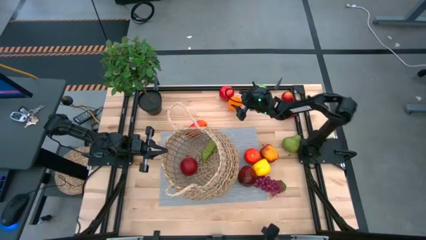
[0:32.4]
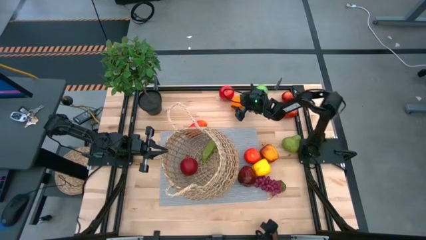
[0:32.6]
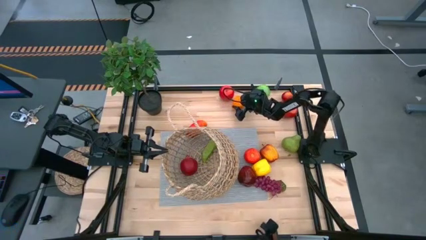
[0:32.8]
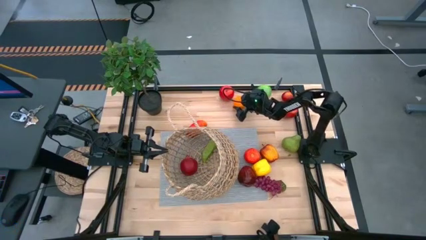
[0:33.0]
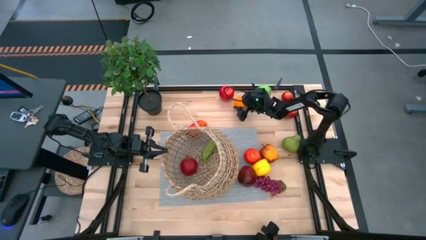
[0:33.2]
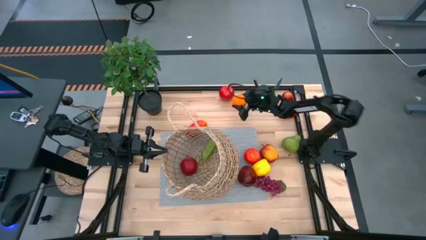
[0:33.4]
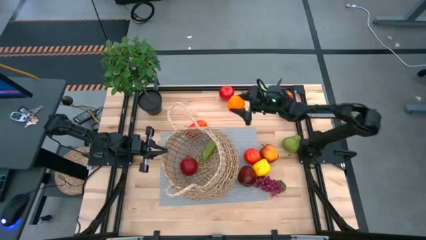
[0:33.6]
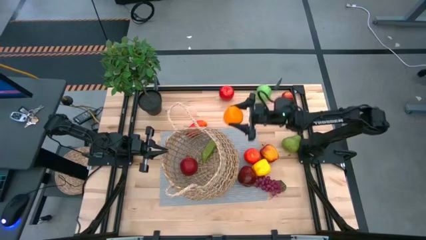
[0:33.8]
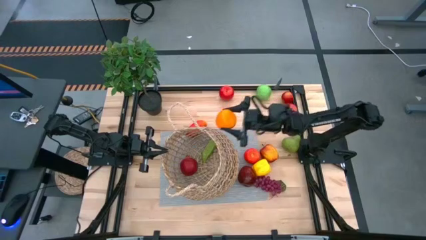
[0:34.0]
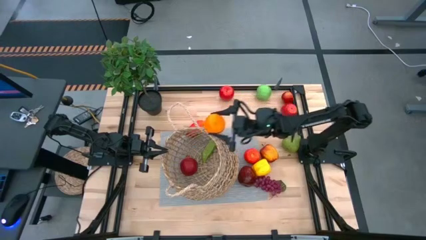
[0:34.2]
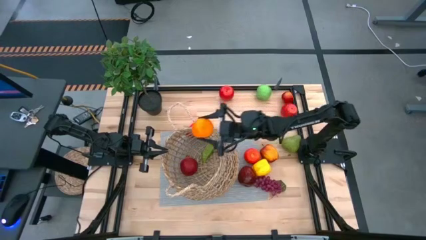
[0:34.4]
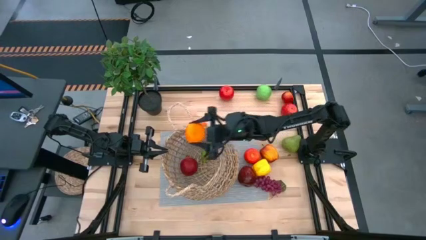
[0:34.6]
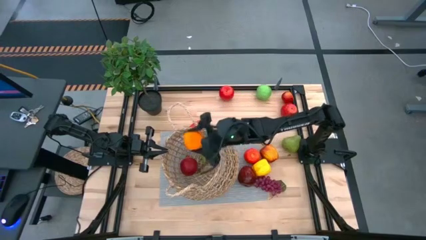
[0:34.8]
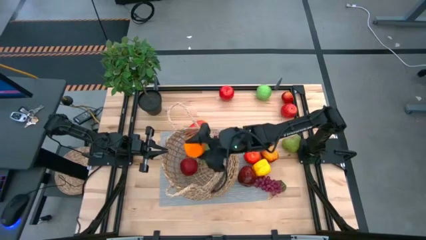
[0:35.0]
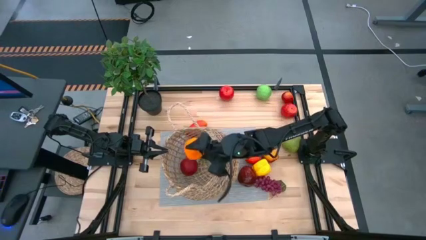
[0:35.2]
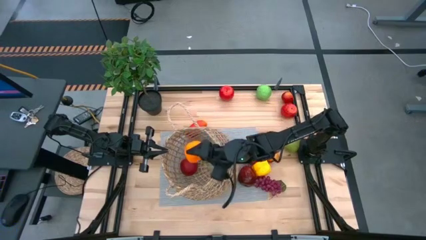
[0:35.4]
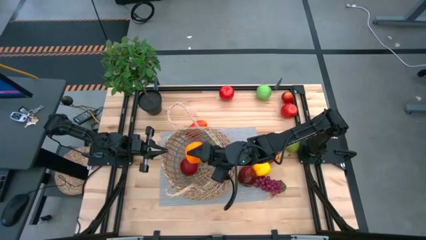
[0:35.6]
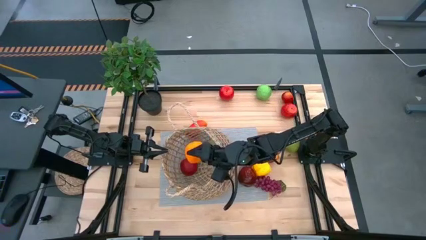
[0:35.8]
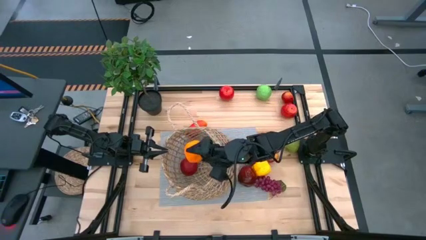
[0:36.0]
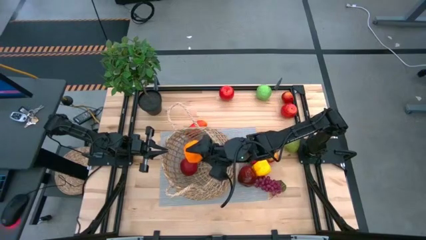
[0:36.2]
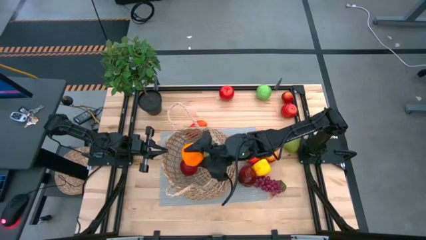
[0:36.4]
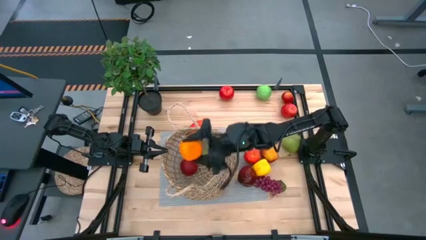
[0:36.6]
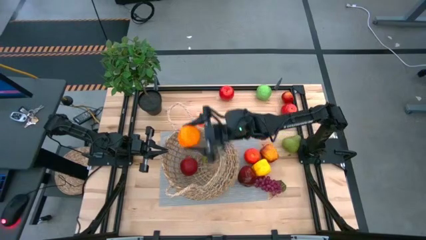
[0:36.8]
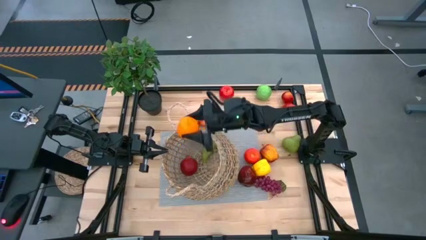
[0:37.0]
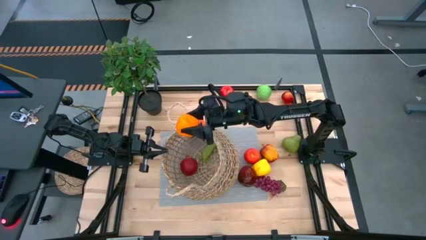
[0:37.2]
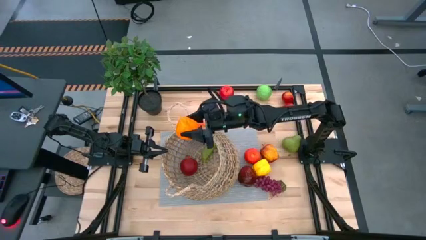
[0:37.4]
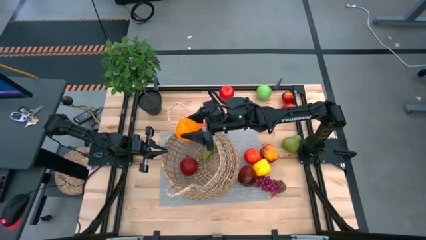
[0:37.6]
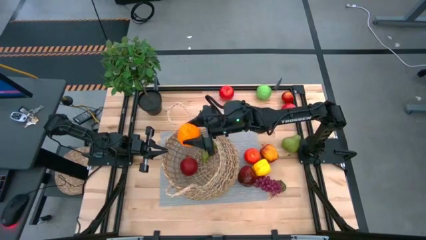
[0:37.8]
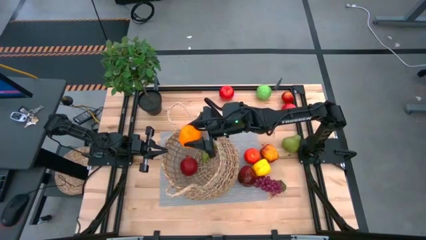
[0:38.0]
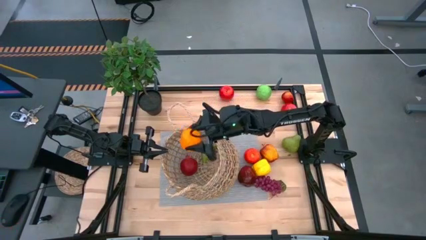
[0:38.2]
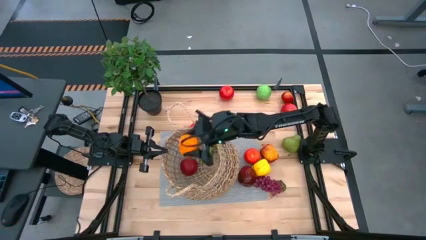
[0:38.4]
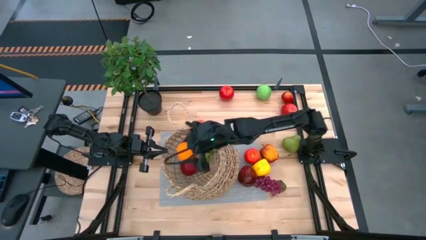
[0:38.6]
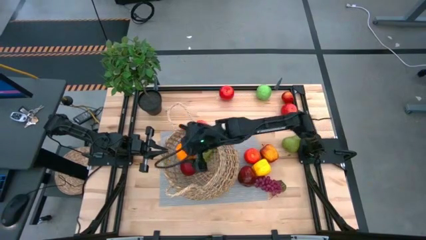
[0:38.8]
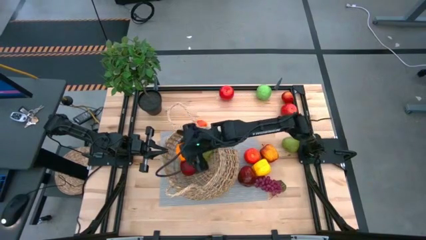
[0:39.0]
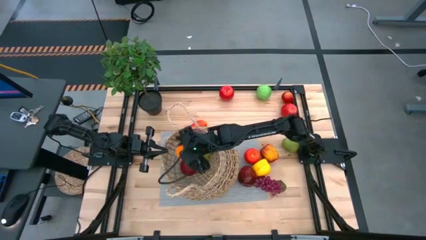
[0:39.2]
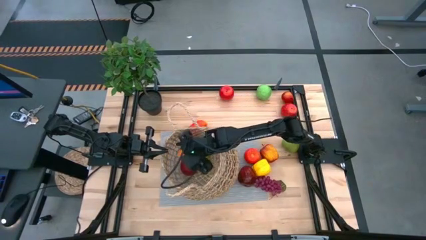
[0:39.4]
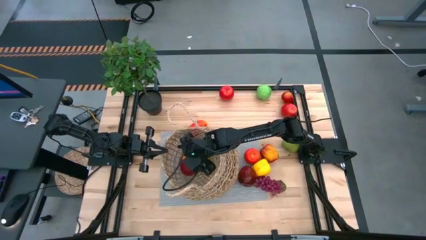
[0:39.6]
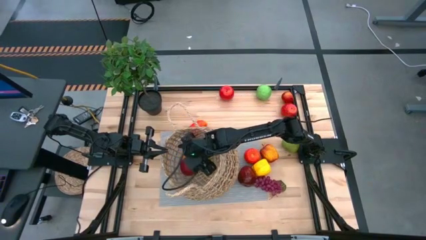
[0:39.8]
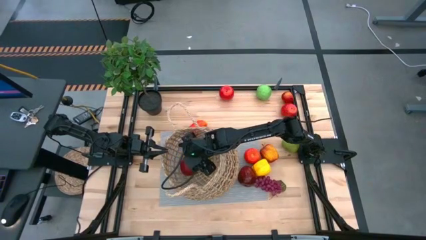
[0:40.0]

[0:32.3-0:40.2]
Task: Build produce basket
Put the orange into the brown woven basket

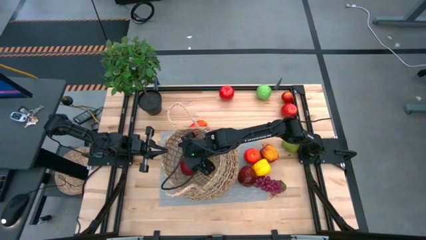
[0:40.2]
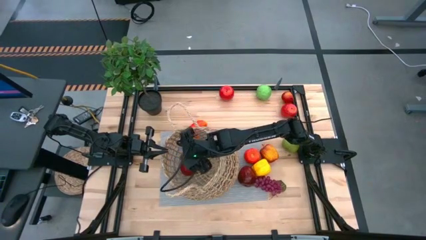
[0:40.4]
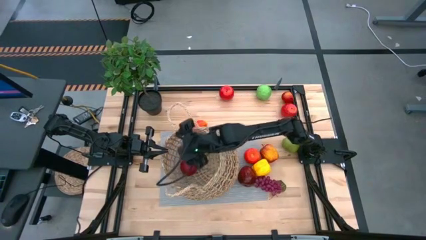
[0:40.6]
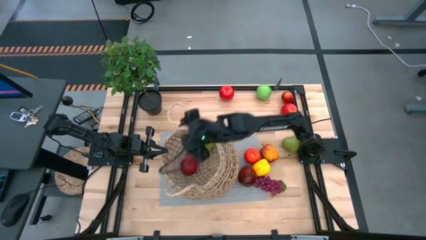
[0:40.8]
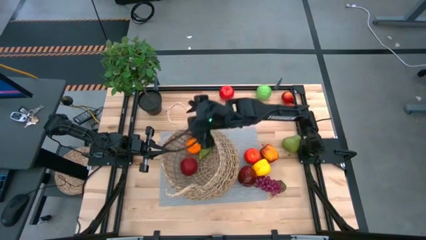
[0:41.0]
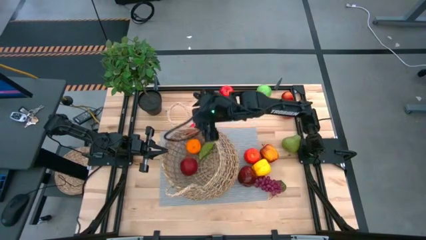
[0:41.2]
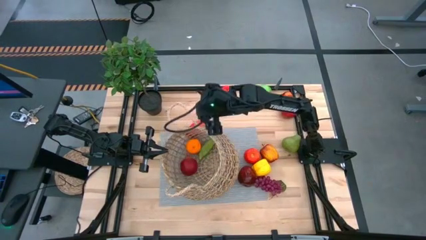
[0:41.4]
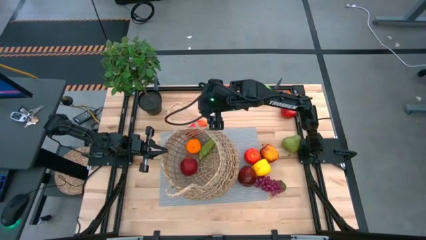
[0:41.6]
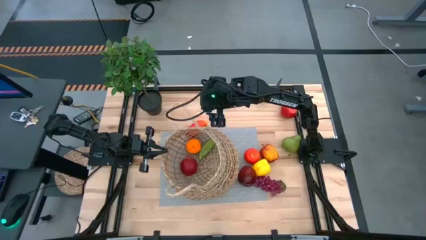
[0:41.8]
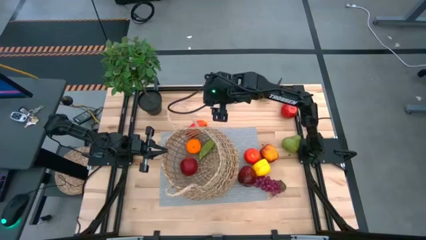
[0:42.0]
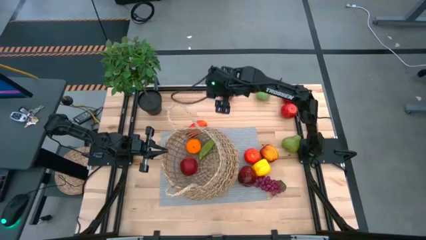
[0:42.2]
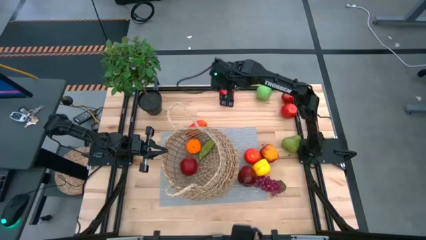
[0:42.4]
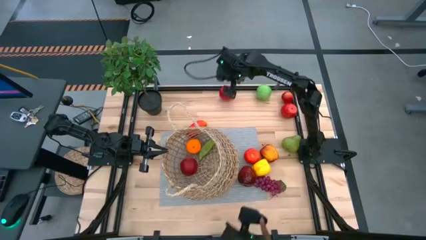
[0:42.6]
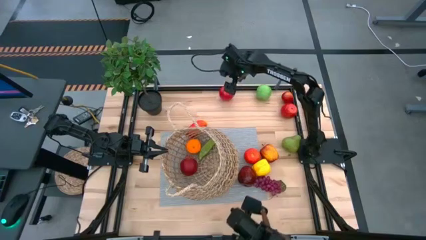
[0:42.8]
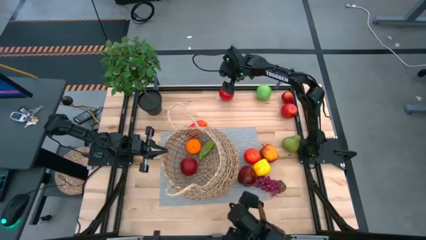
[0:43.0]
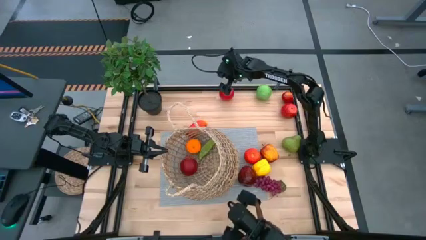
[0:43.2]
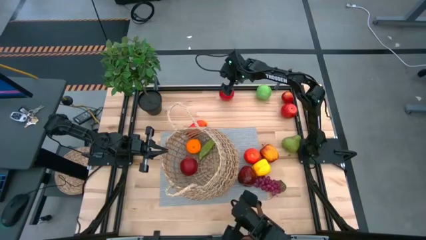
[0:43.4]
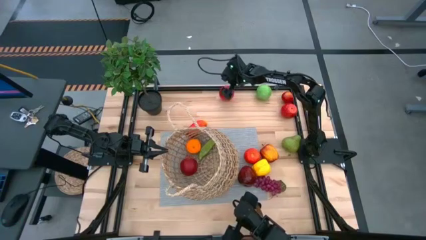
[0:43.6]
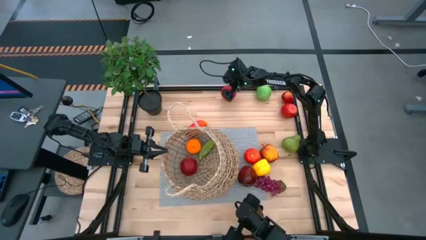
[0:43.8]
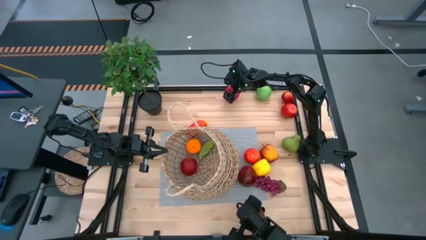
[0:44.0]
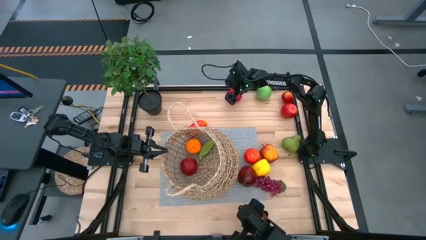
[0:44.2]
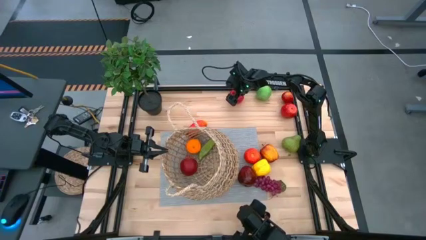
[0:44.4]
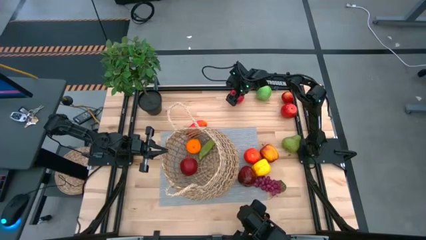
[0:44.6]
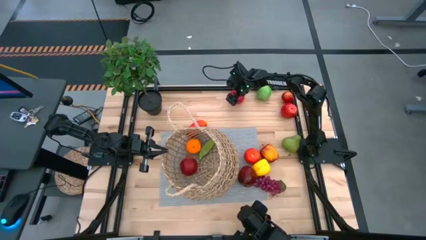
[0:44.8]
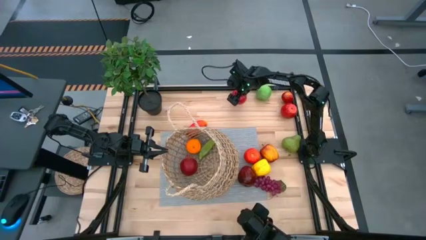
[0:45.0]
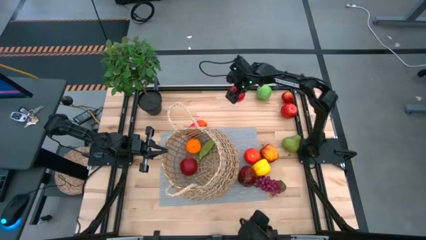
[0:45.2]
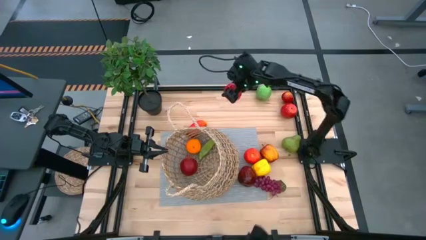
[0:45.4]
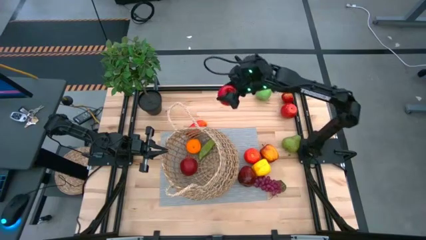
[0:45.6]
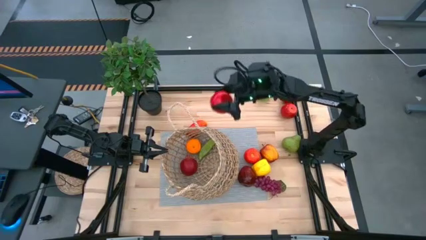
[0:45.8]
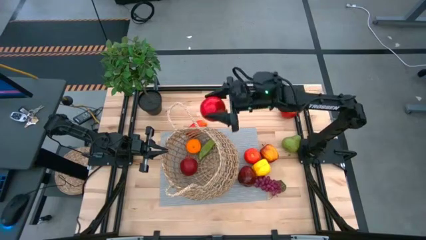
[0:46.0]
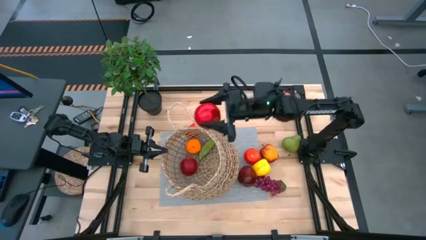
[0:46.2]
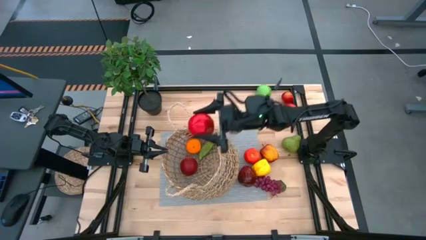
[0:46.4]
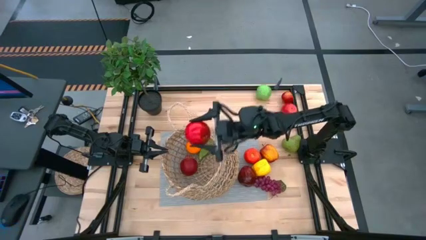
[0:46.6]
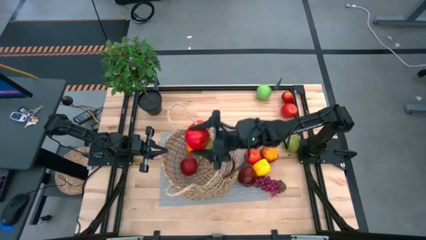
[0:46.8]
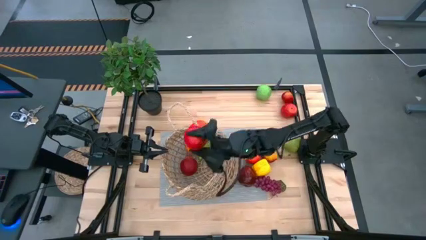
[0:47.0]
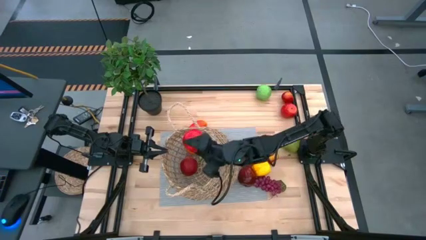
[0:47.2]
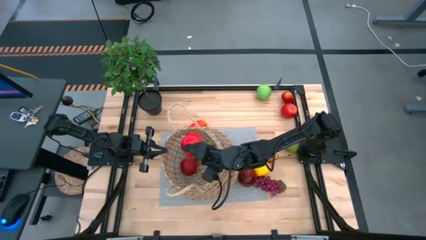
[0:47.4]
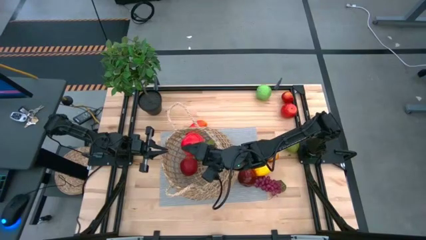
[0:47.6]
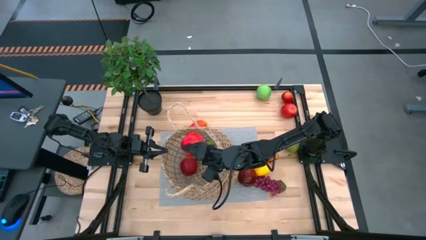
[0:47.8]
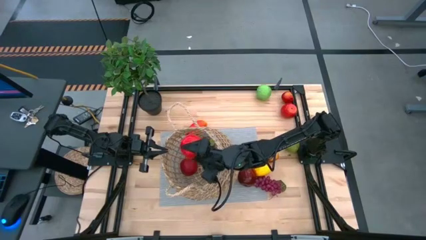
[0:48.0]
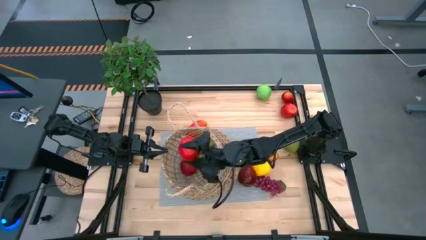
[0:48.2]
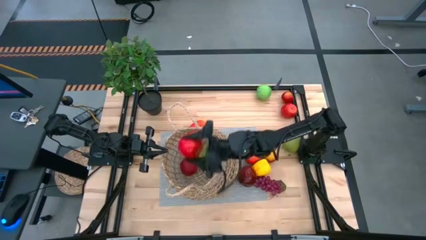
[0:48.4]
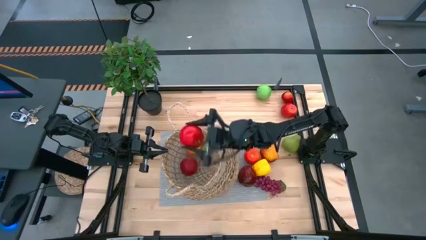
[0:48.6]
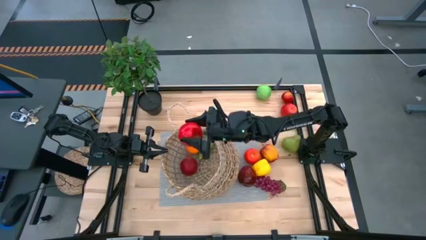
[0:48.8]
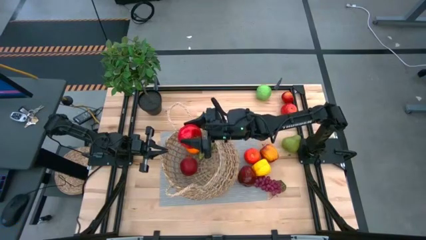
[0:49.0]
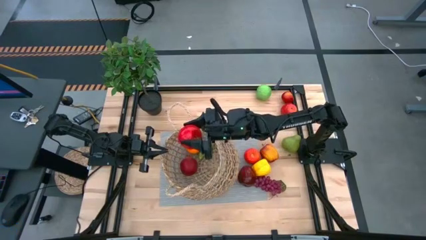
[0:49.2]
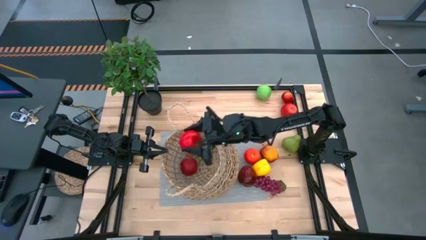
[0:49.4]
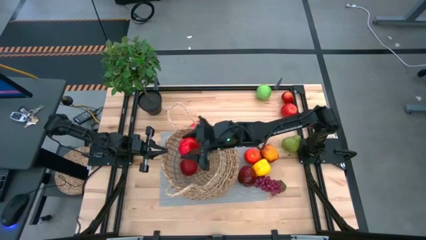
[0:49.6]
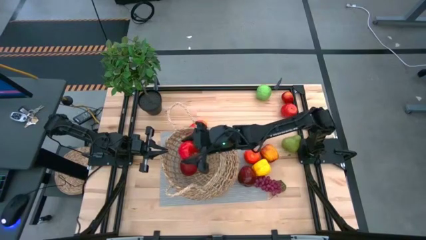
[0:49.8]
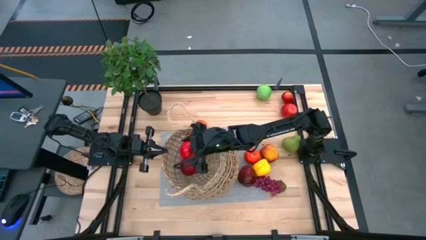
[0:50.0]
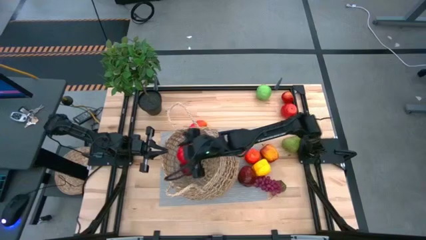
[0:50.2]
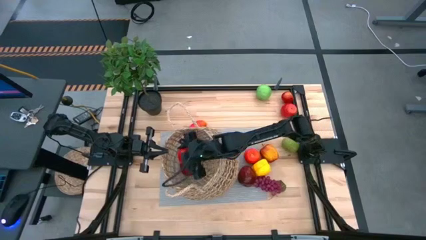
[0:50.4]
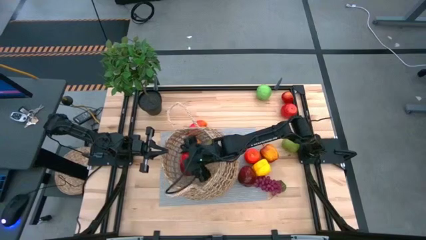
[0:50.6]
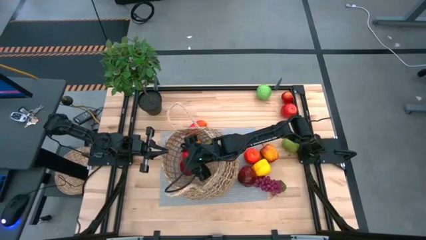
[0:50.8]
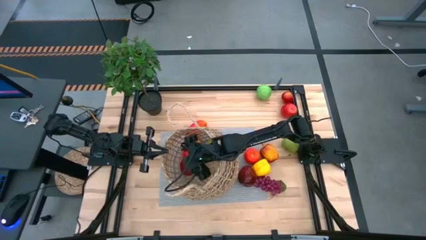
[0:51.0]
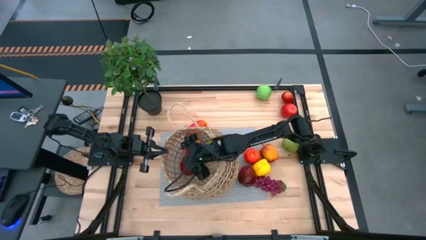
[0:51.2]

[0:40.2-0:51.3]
Put the red apple into the brown woven basket
